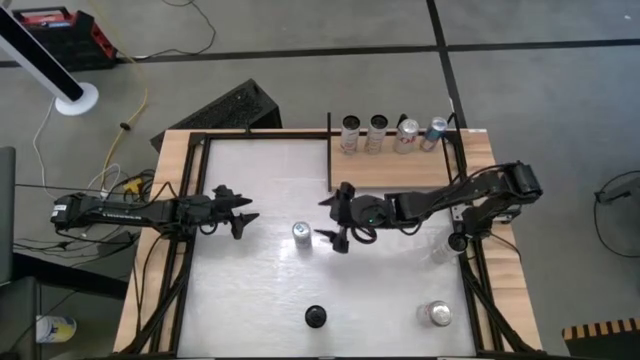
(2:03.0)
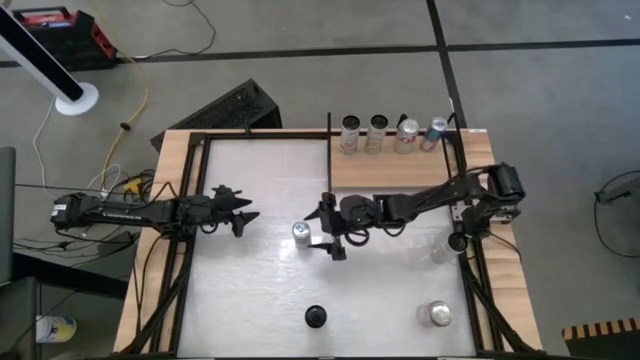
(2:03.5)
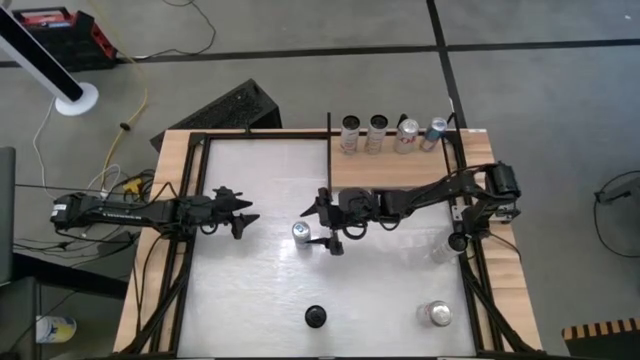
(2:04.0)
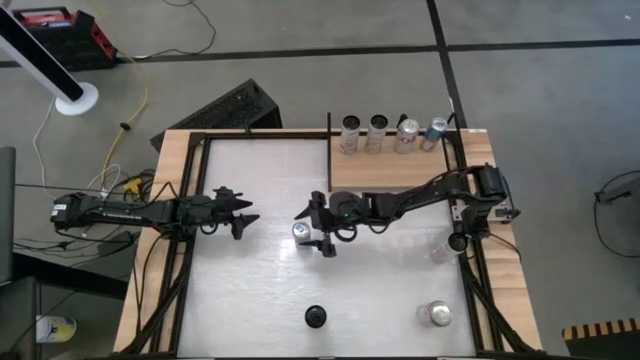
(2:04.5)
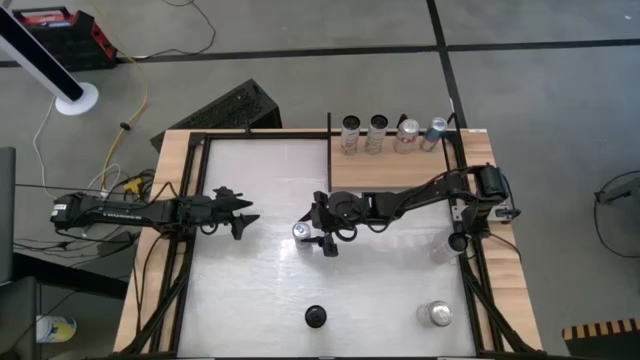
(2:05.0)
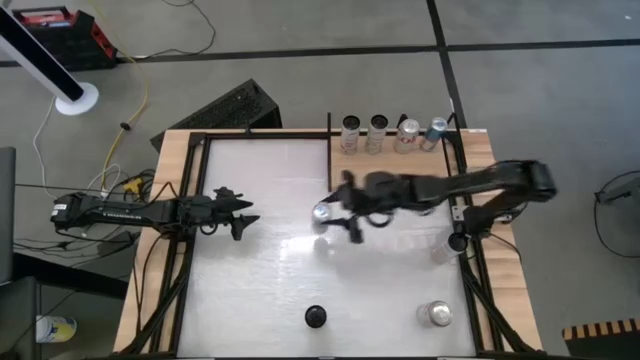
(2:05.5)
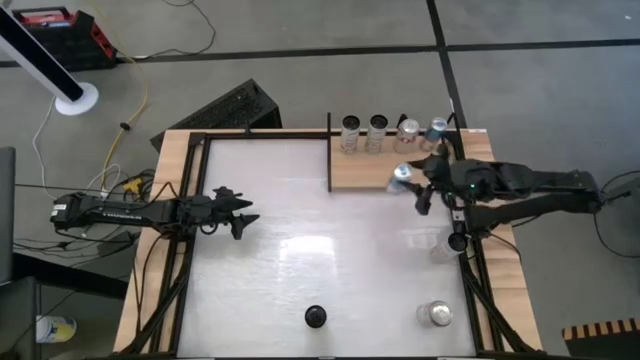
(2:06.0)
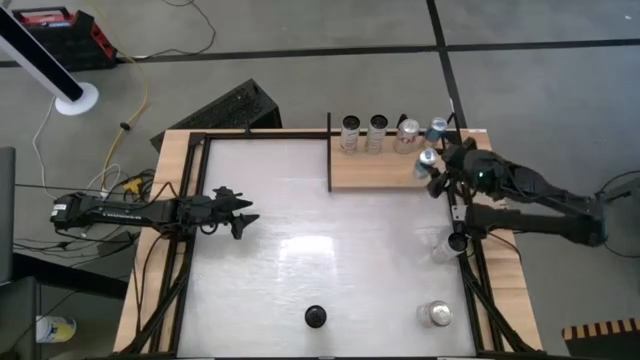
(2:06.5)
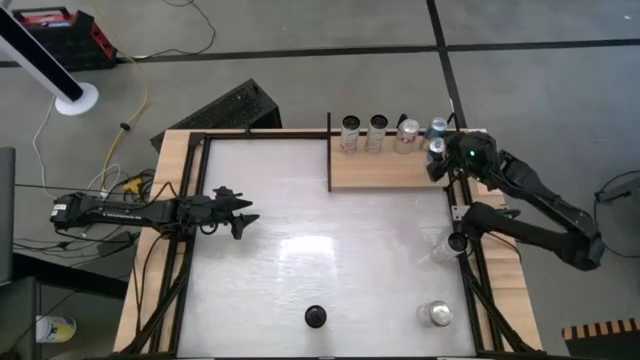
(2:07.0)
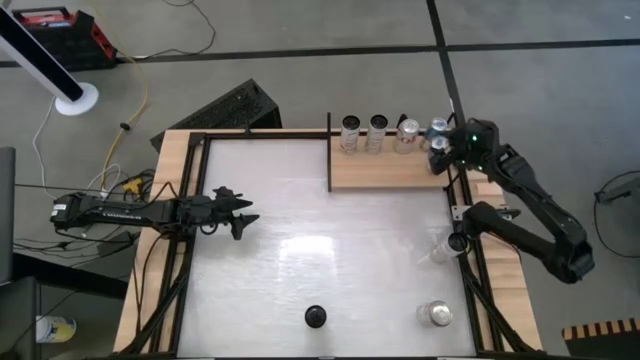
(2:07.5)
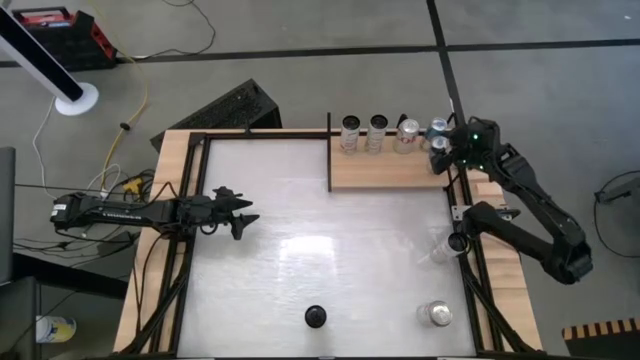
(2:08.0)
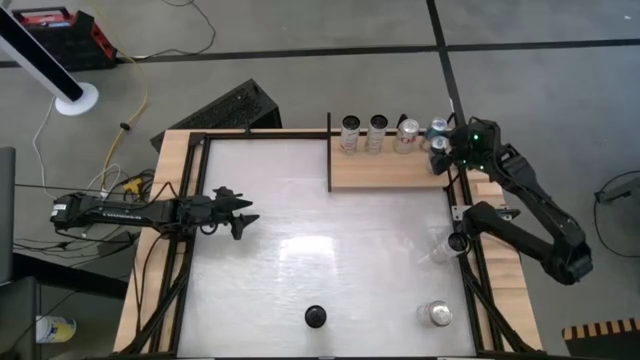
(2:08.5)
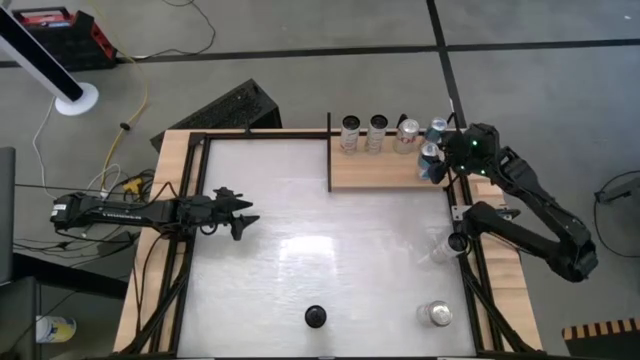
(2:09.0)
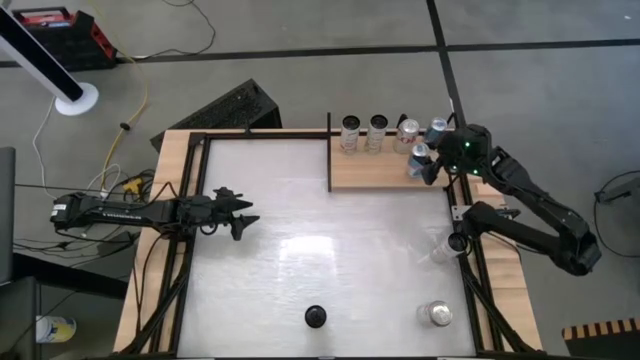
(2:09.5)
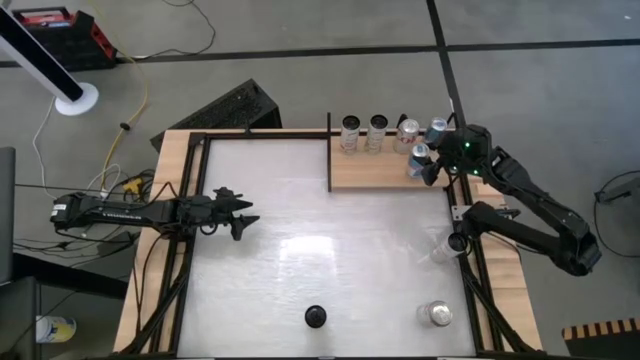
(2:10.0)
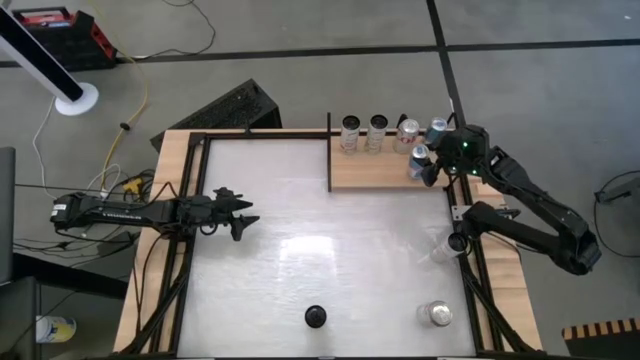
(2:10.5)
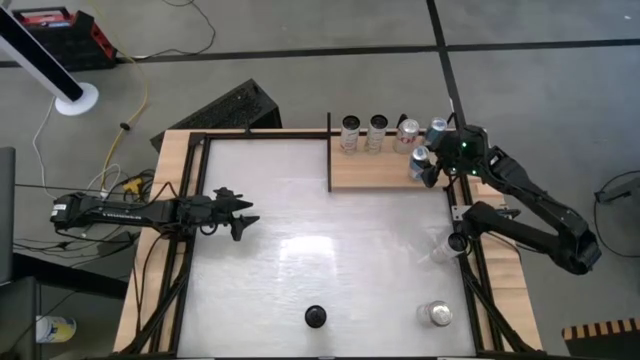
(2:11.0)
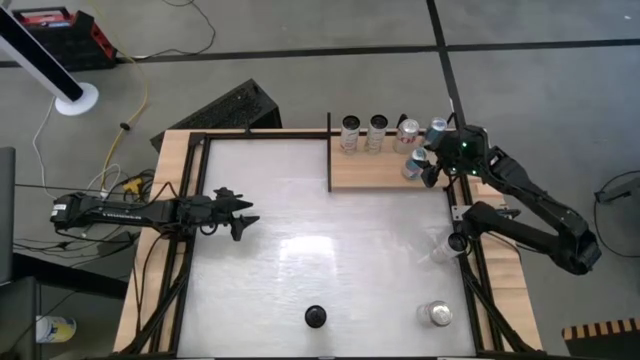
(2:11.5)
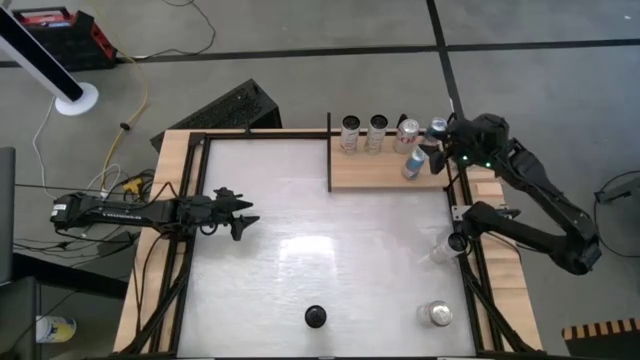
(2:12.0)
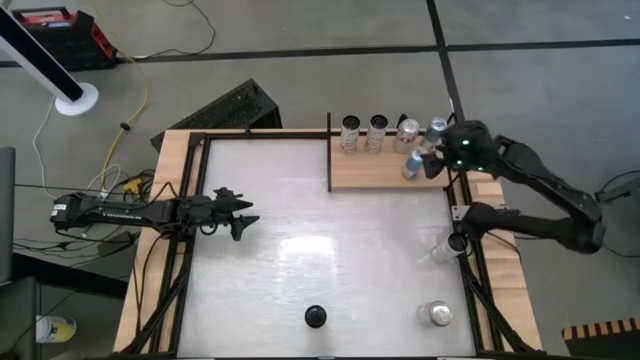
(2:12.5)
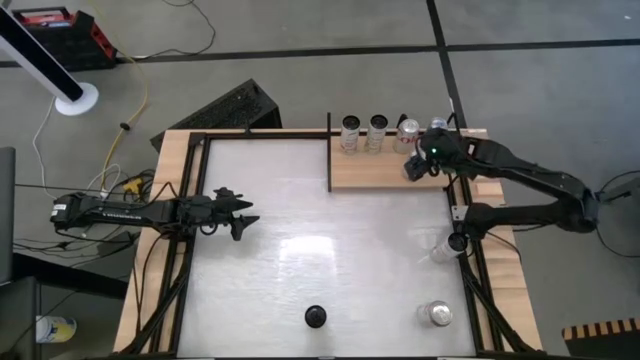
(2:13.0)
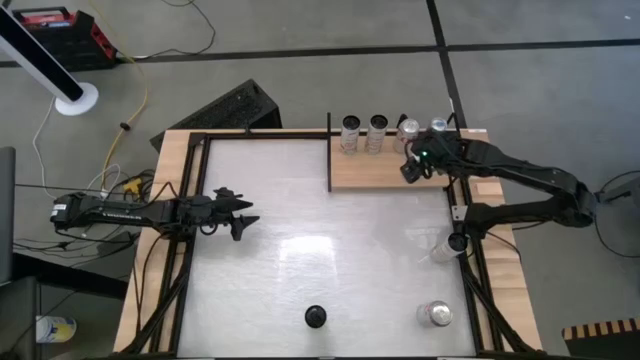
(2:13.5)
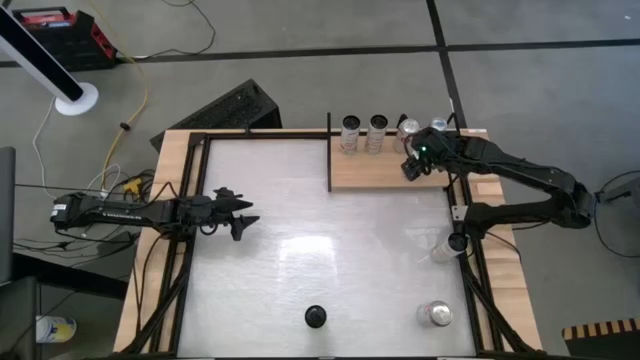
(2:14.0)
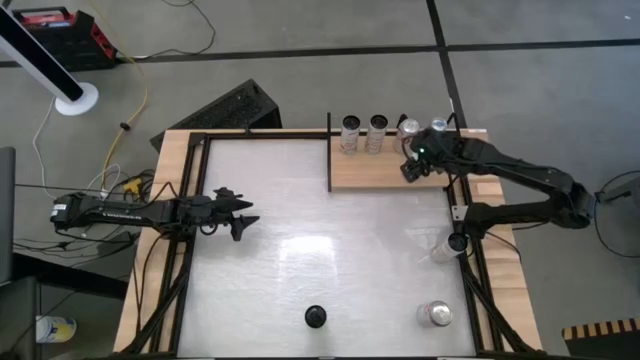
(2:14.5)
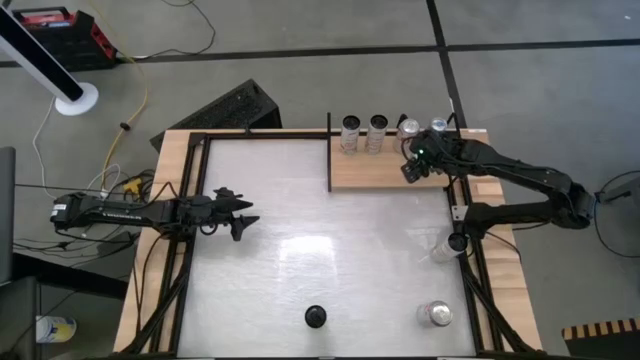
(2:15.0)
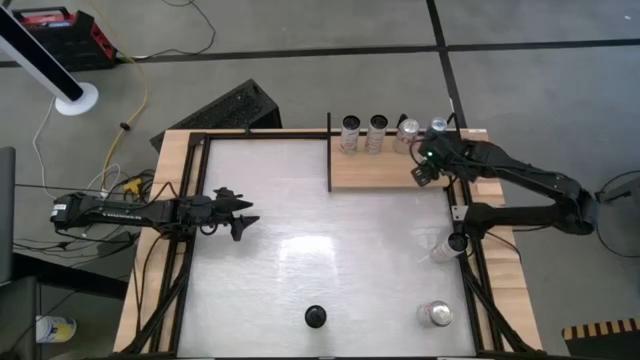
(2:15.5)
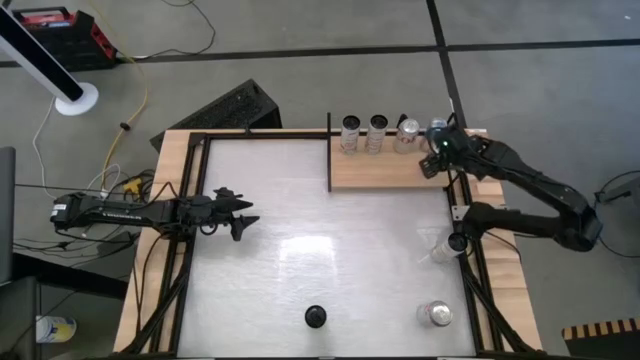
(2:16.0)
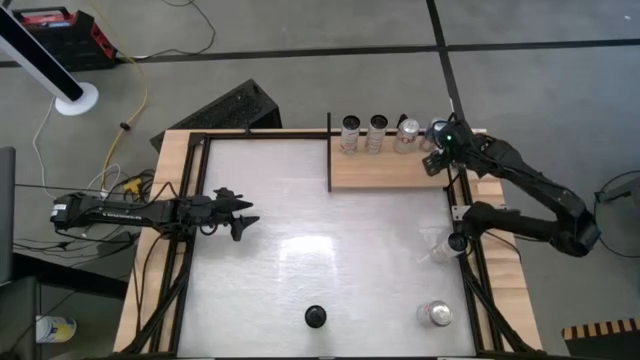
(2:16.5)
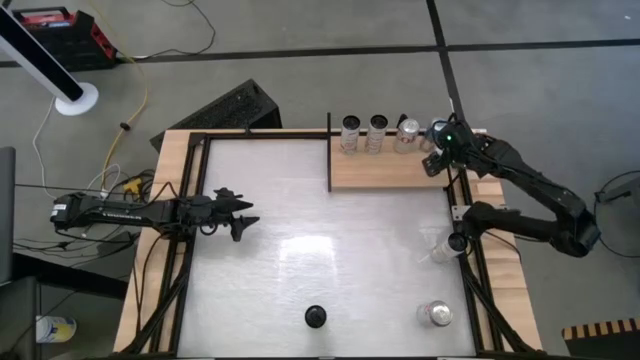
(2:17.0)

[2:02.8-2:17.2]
Task: Place canned beverage on shelf
Put the blue soda can on the shelf aligned with the other blue soda can

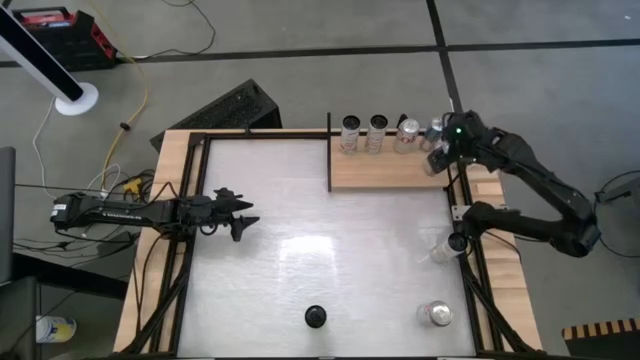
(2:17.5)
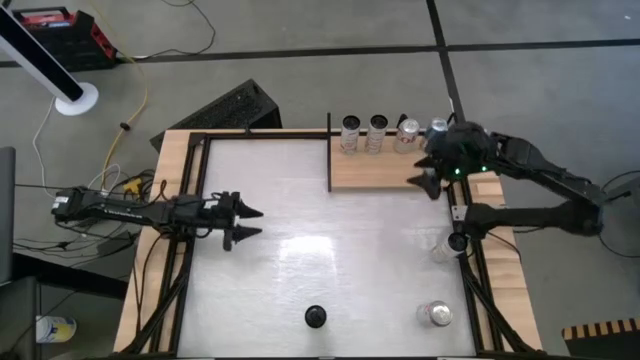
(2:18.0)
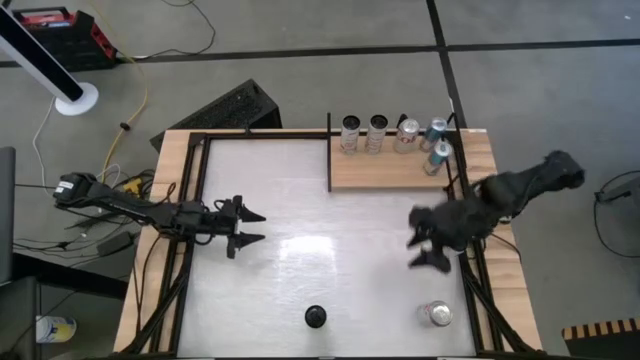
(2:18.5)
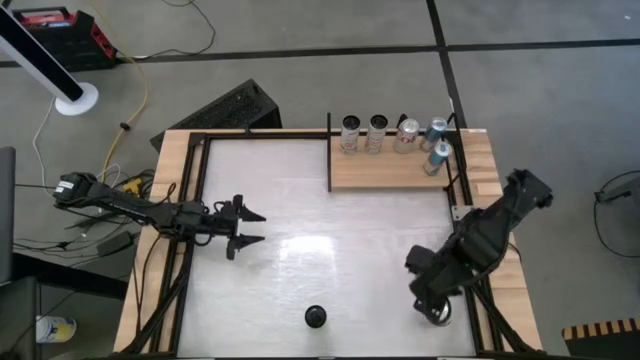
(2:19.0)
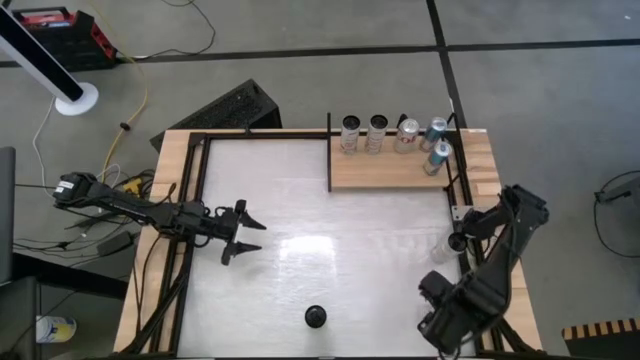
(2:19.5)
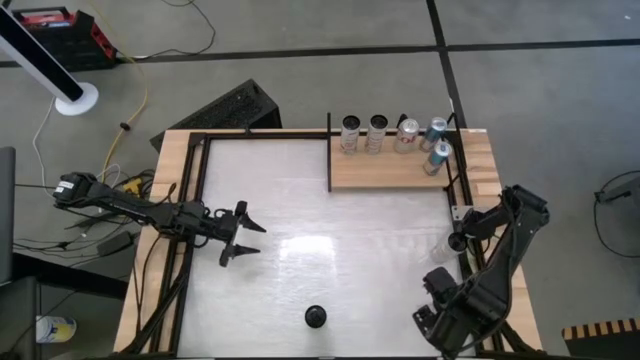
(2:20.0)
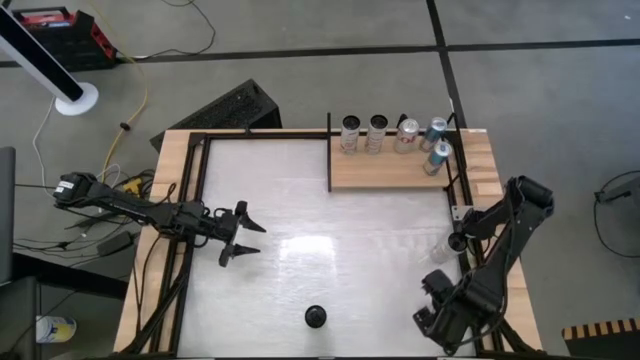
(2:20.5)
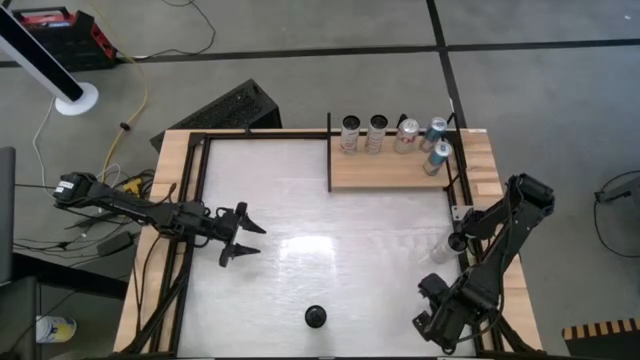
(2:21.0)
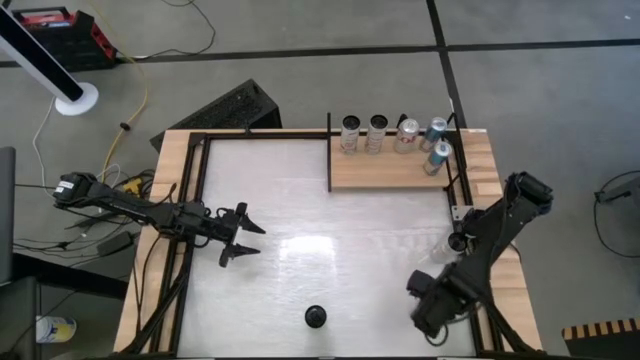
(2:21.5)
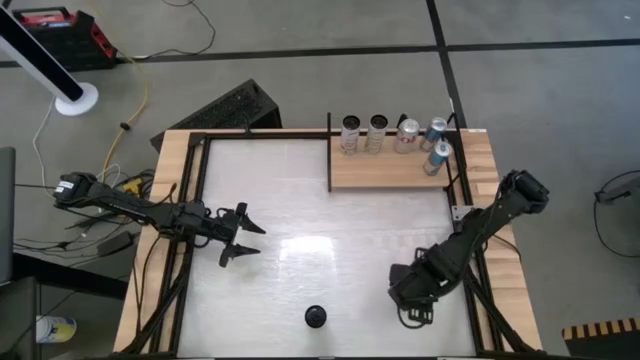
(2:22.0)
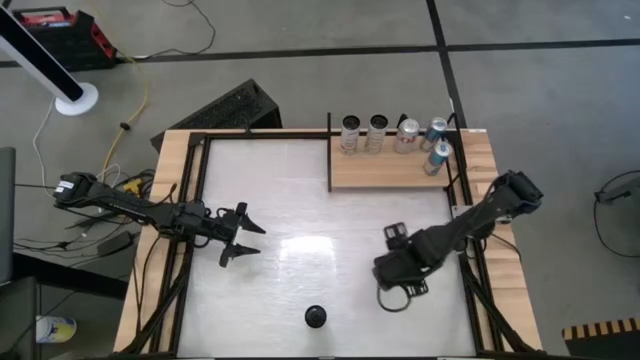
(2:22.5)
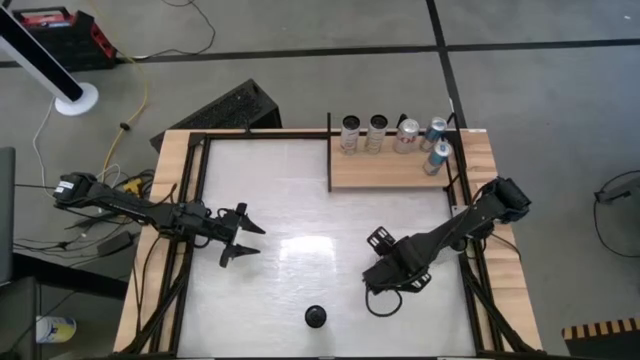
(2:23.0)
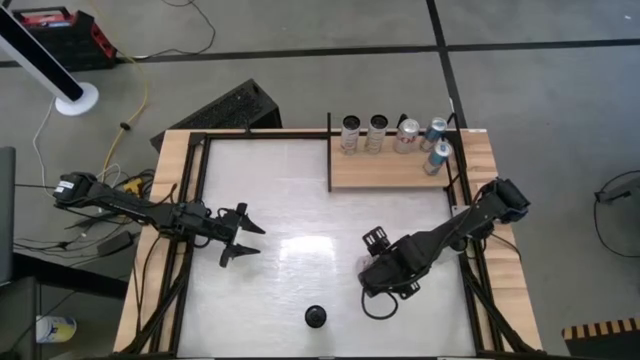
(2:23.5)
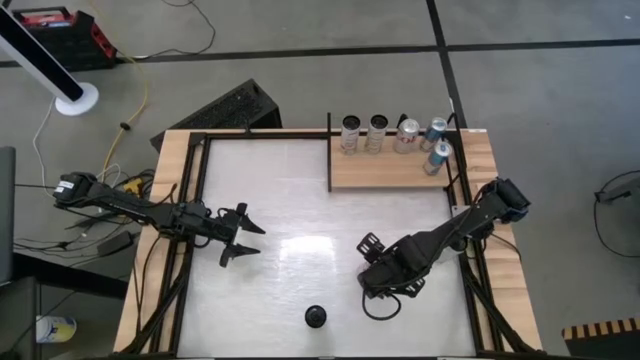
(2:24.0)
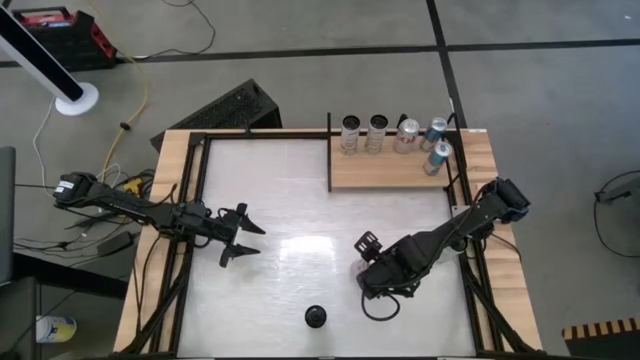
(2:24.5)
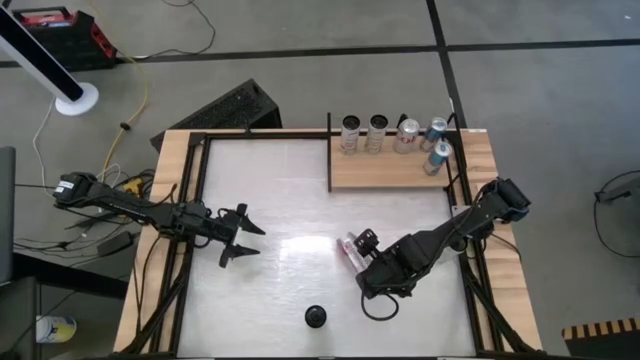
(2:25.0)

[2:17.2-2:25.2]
Put the silver soda can on the shelf aligned with the other silver soda can
